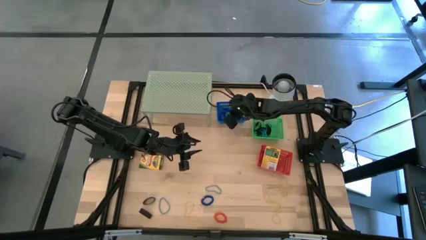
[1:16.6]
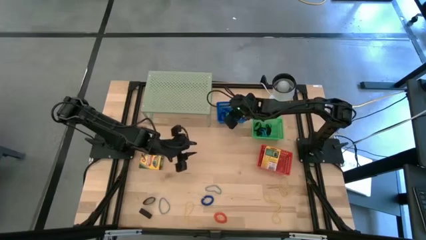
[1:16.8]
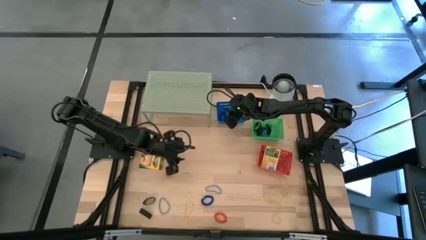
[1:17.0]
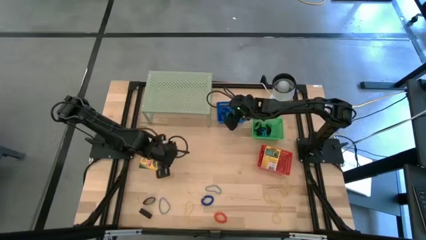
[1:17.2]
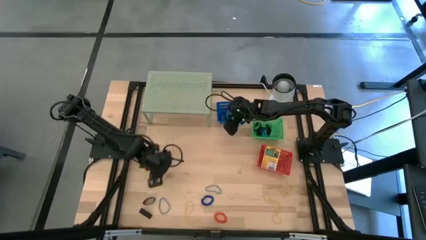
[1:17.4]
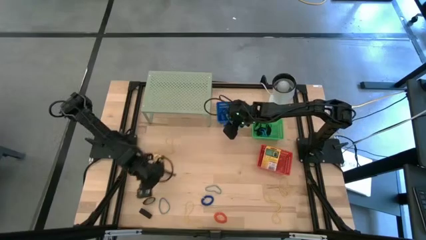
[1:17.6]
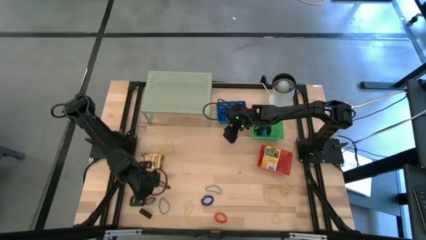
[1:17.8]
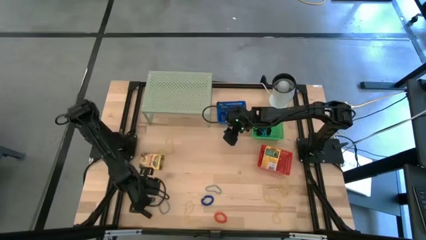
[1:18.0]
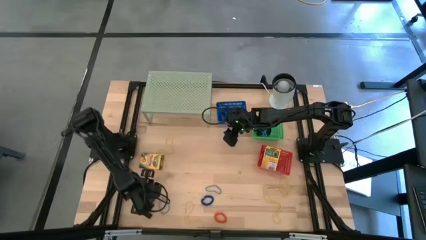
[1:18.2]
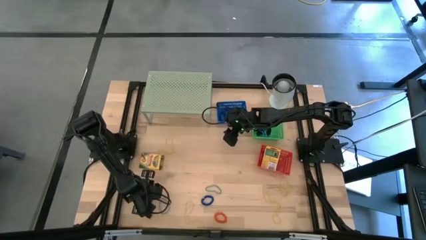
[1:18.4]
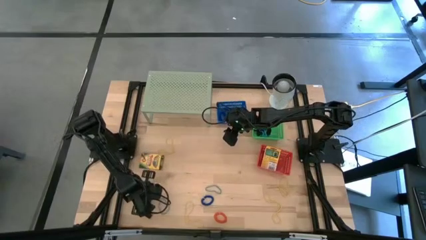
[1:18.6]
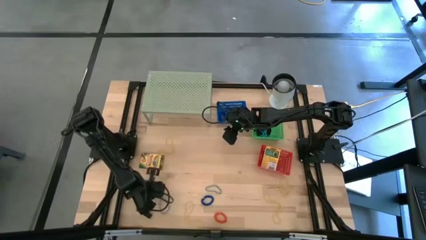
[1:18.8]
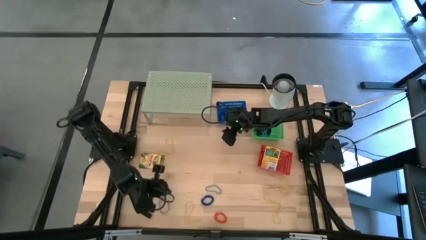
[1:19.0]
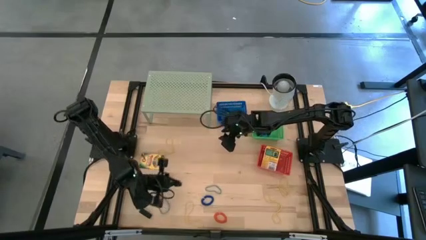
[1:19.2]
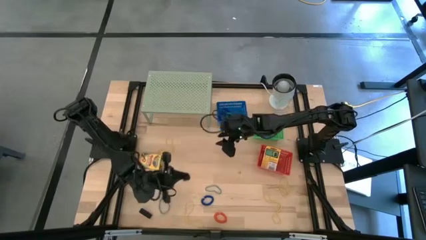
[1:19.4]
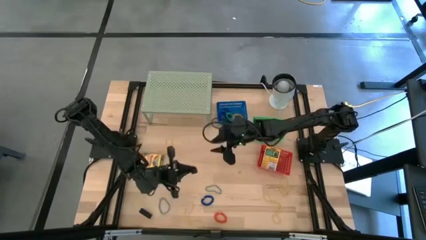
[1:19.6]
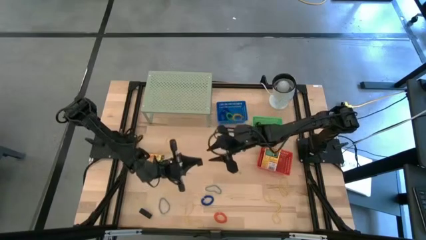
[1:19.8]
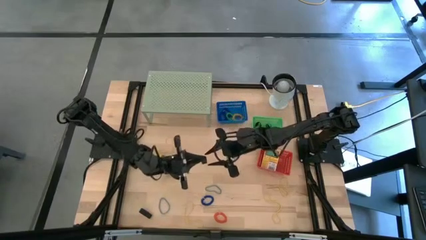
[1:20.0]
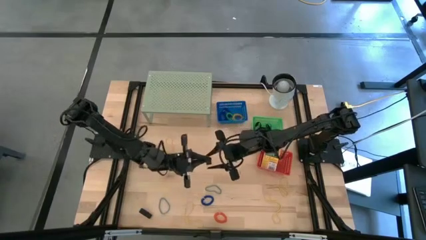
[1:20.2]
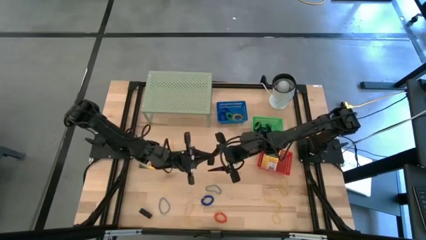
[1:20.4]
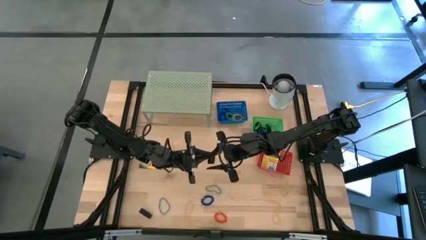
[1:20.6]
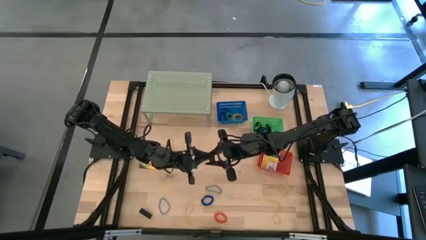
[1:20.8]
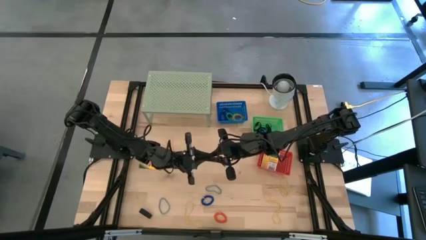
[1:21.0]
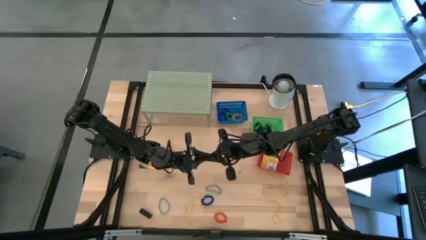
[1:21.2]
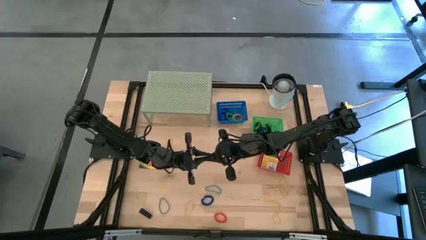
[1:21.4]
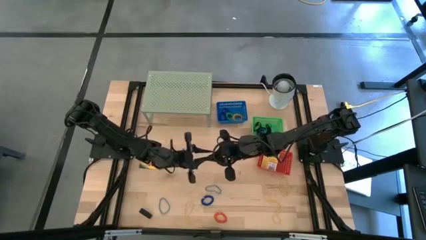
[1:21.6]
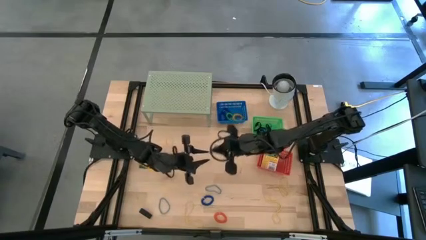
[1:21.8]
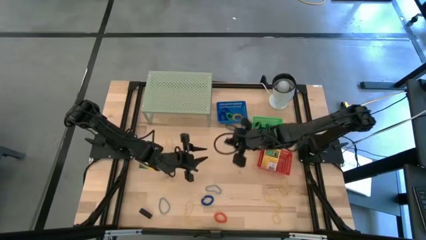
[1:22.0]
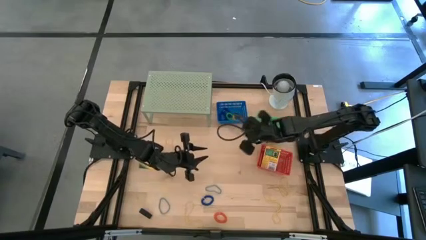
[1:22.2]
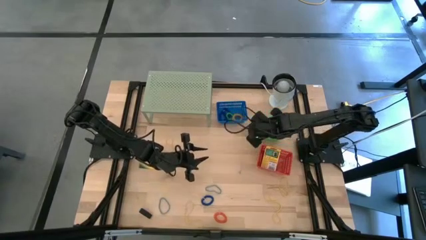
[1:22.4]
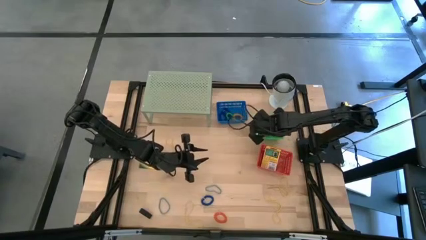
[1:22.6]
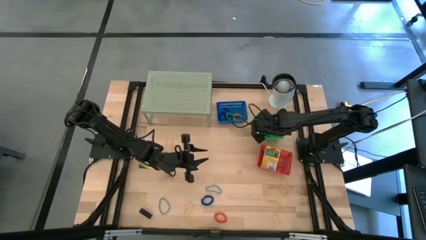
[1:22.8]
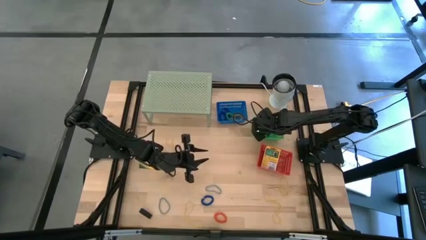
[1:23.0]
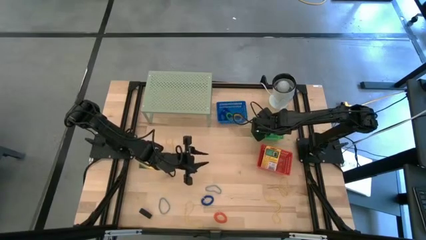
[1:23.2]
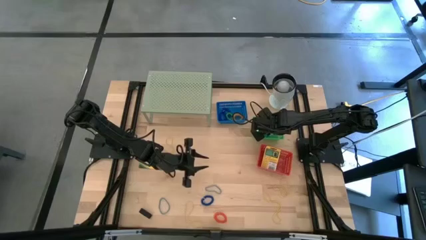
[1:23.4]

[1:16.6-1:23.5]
Task: Pick & Place Office Desk Supplies
Put the black rubber band into the green bin

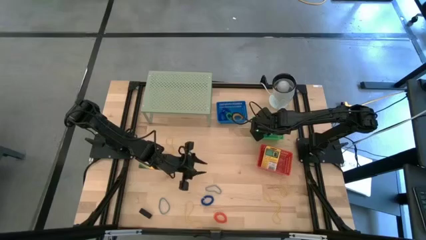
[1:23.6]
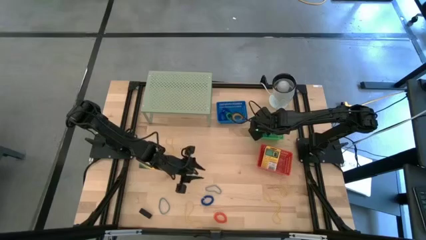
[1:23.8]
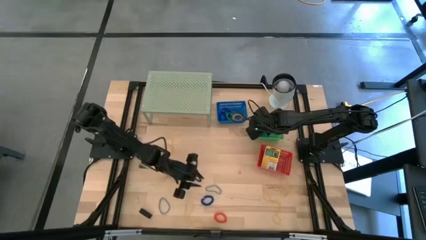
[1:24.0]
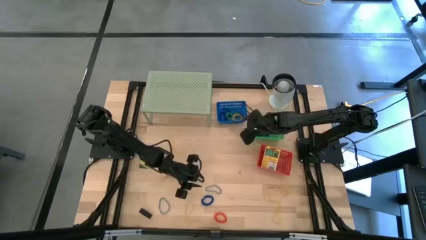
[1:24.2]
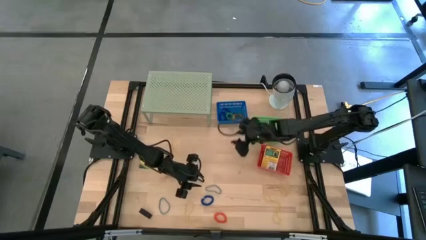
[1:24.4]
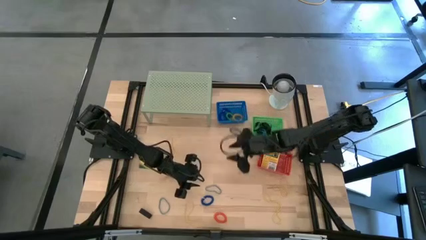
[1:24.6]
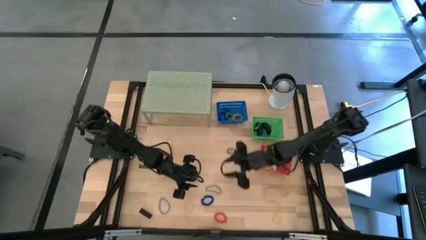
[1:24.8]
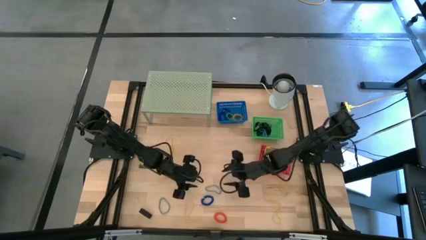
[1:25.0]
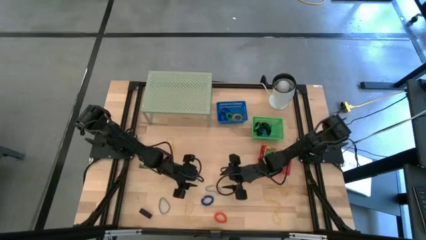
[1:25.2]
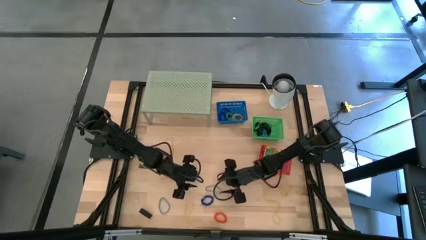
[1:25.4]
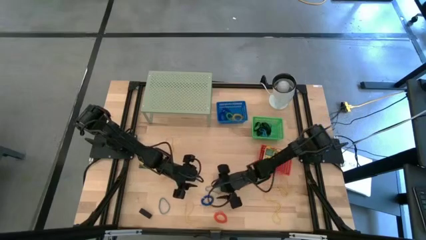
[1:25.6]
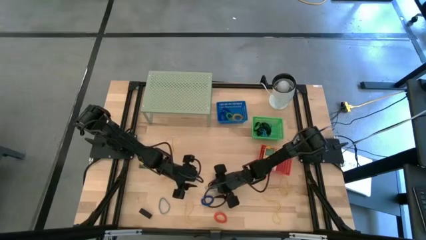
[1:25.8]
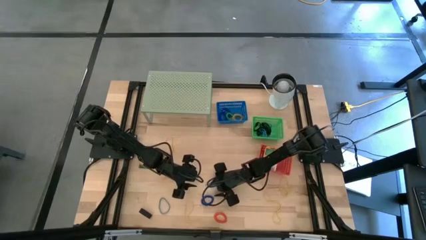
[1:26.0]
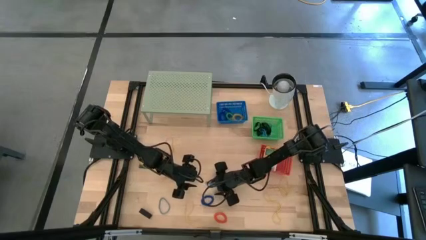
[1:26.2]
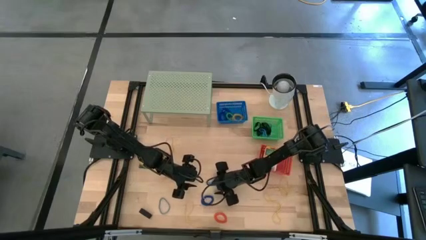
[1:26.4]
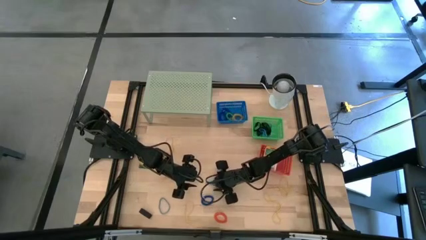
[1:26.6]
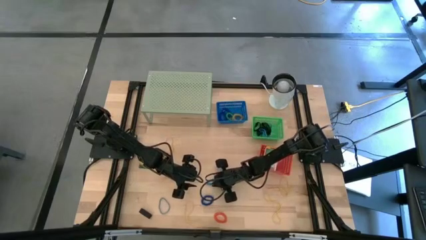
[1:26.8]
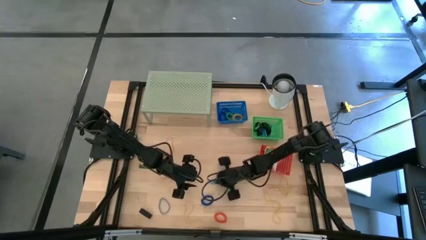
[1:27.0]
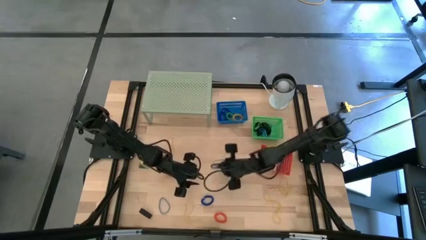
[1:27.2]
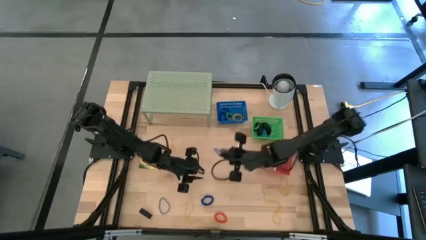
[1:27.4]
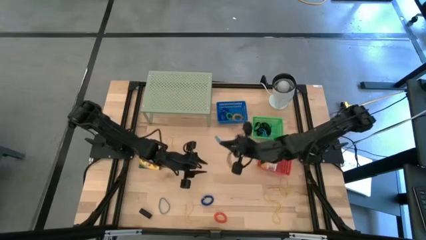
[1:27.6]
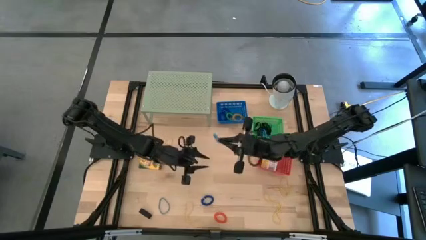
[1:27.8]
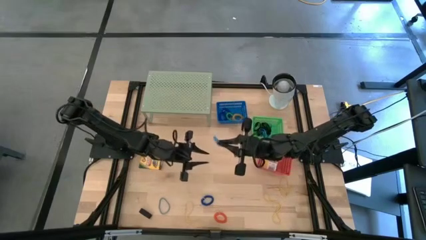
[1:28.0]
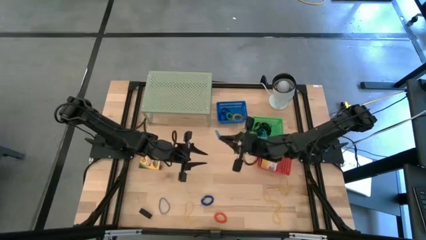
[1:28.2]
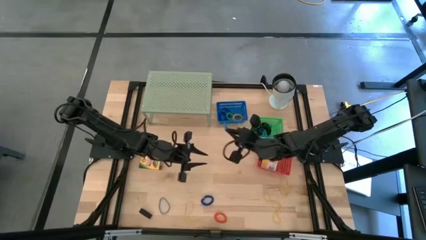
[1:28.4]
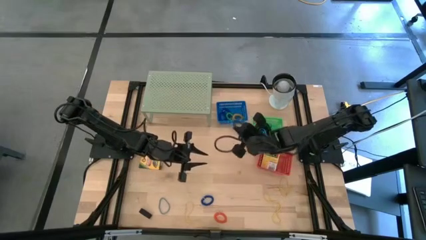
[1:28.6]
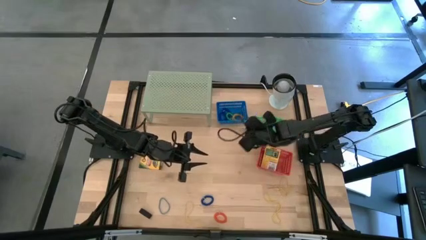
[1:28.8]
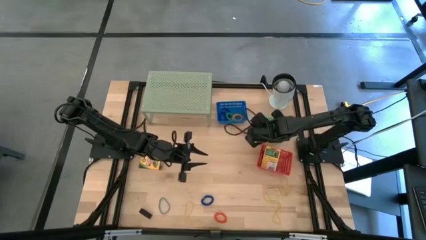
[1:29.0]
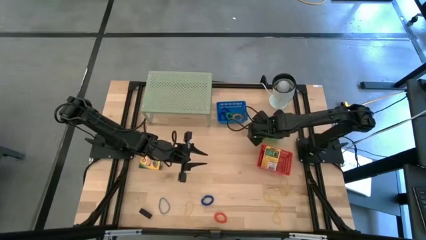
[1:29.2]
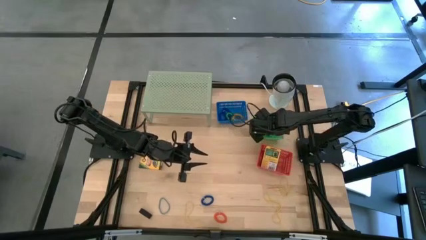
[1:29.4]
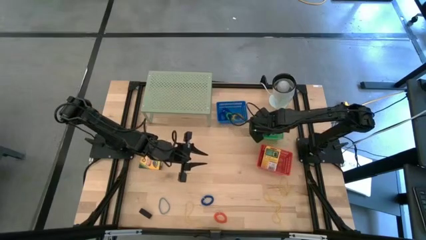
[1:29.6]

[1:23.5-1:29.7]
Put the blue rubber band into the green bin

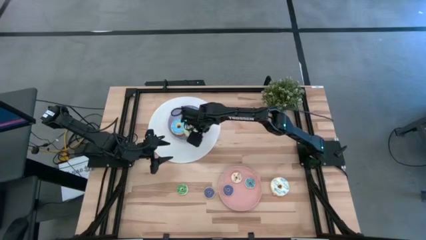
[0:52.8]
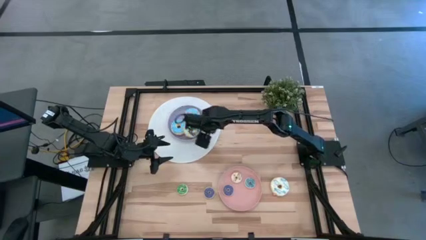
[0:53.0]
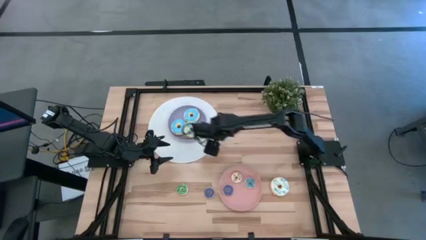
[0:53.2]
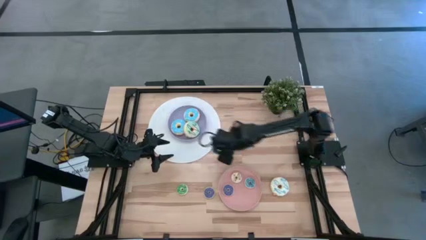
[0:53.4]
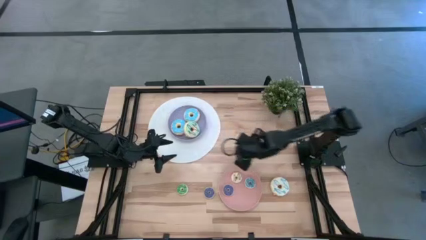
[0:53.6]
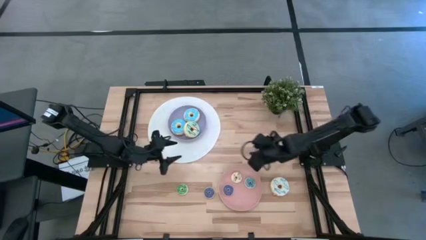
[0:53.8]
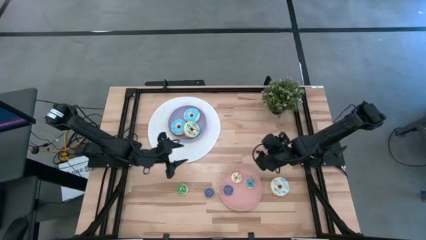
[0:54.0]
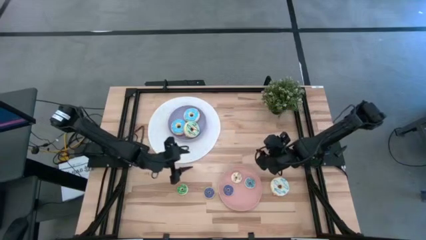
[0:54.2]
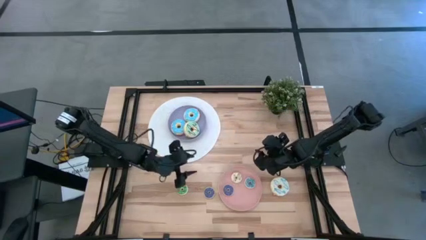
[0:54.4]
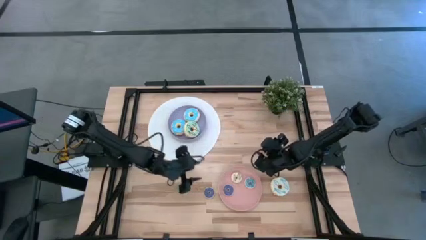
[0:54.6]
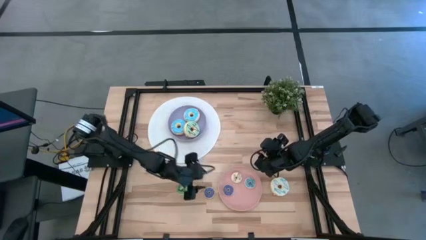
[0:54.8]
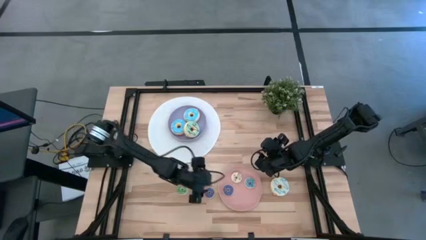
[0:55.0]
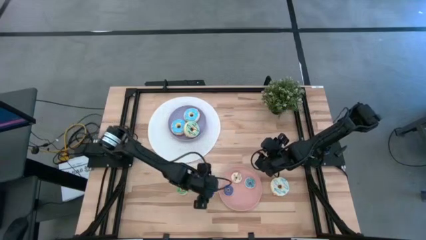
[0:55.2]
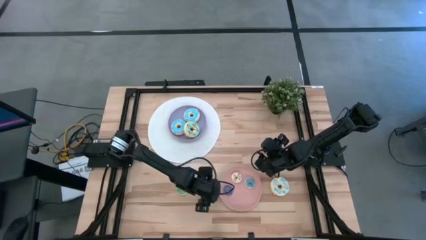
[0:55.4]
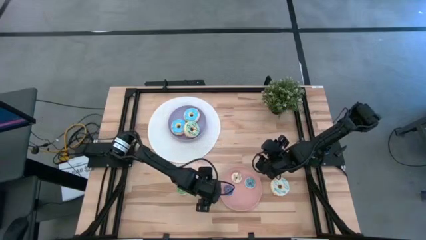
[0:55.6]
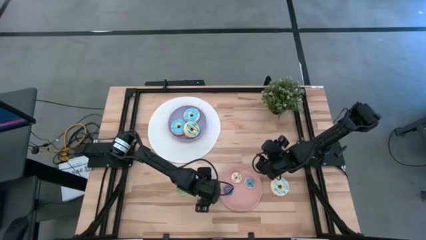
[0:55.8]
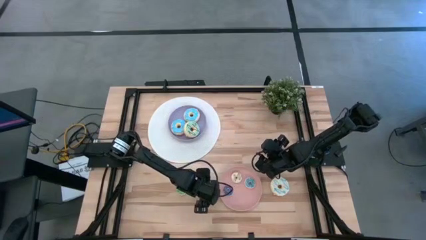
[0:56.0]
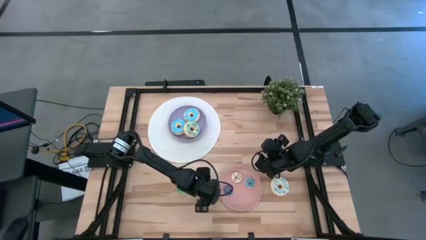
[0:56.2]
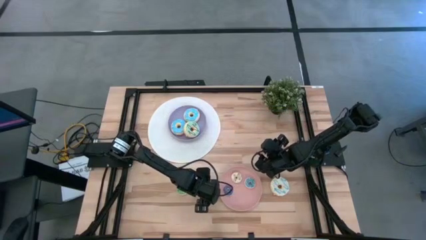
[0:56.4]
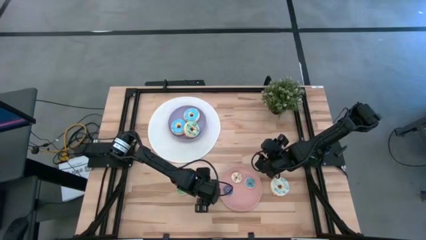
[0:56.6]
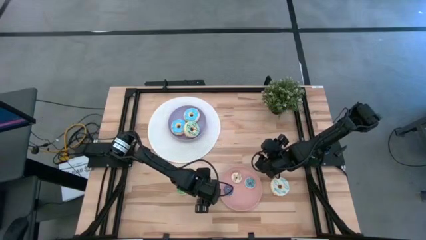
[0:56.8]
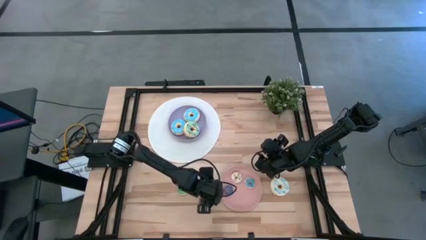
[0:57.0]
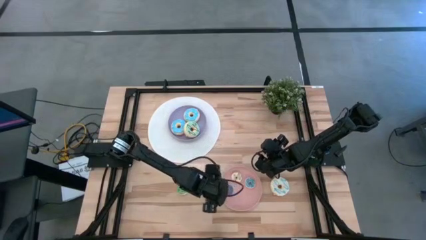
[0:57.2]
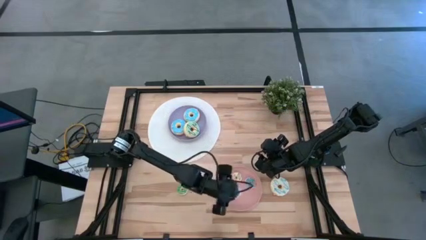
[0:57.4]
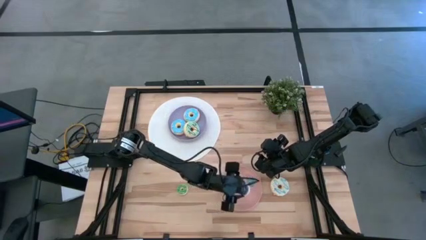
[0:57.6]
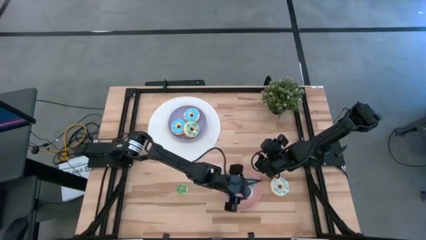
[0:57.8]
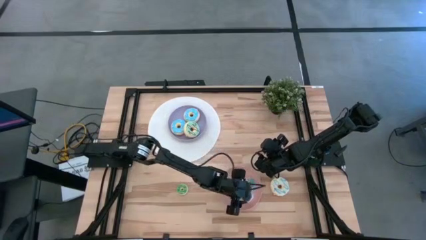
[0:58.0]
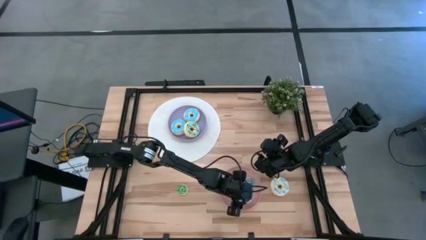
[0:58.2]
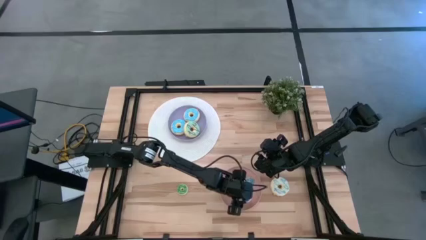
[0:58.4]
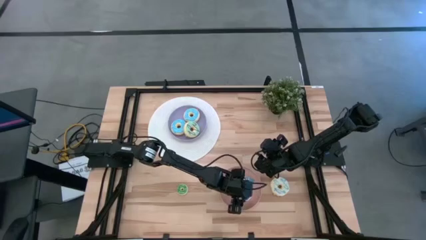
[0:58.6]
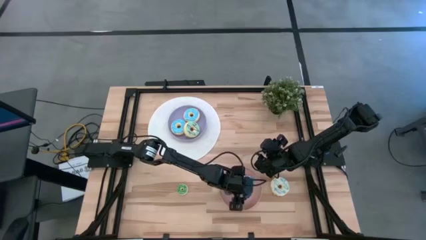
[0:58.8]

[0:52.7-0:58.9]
Task: Pick & Place donuts
Put the small blue donut on the pink plate
